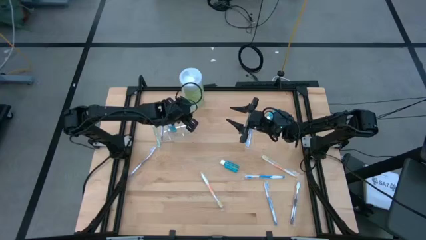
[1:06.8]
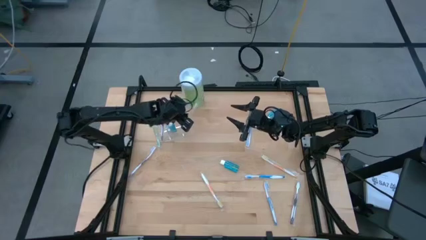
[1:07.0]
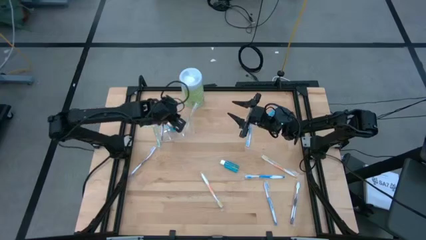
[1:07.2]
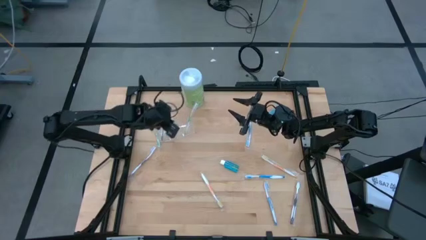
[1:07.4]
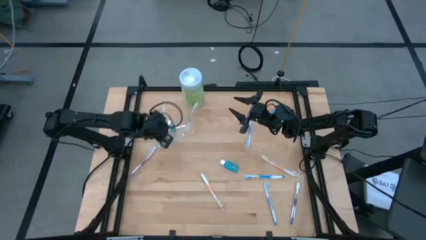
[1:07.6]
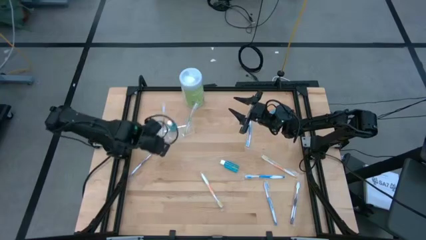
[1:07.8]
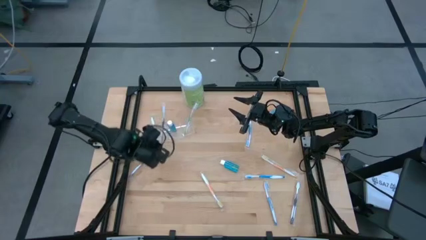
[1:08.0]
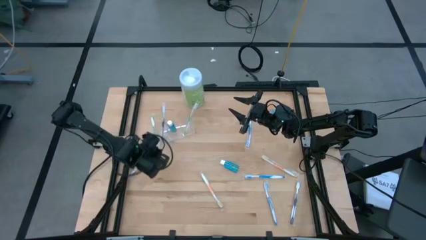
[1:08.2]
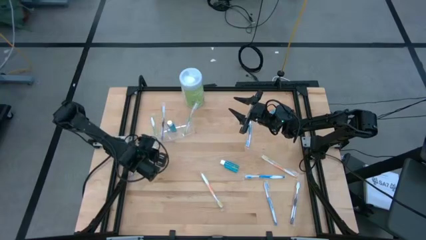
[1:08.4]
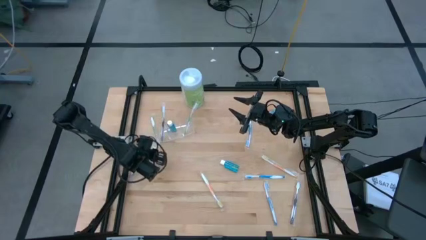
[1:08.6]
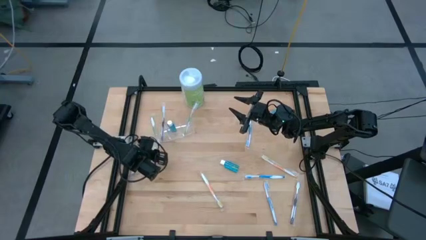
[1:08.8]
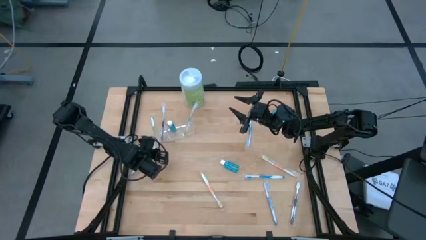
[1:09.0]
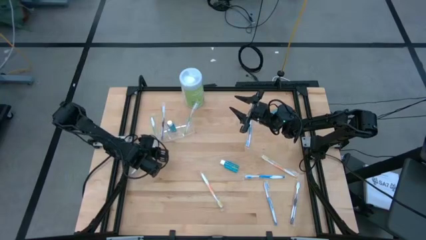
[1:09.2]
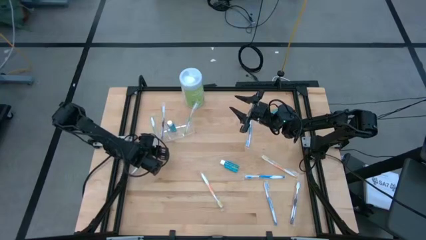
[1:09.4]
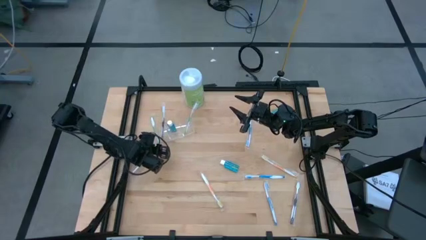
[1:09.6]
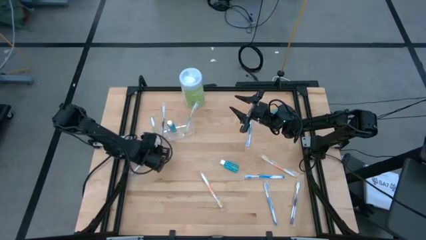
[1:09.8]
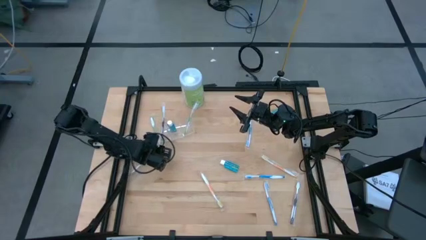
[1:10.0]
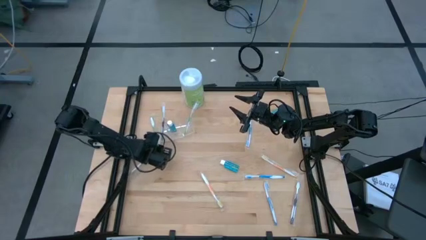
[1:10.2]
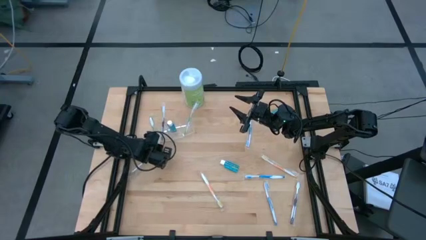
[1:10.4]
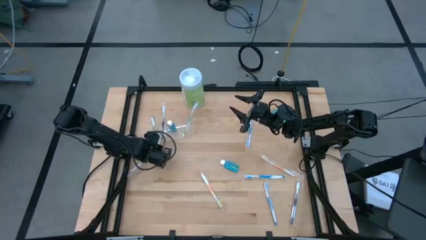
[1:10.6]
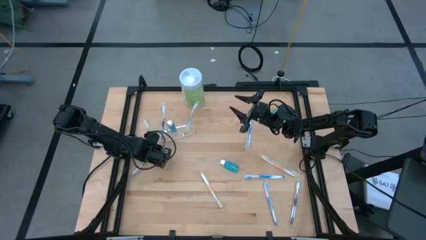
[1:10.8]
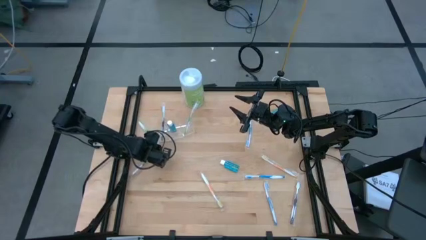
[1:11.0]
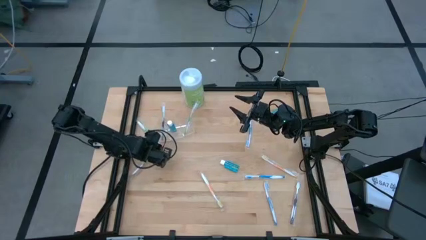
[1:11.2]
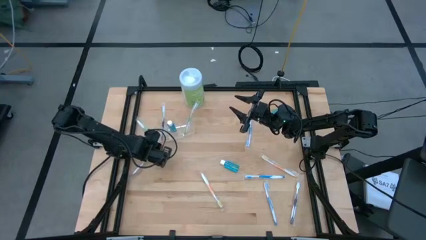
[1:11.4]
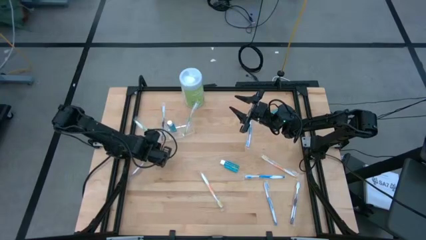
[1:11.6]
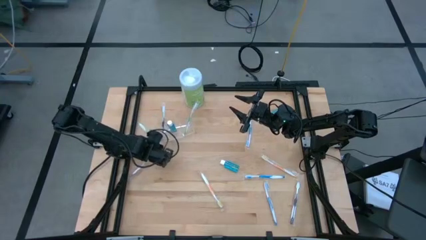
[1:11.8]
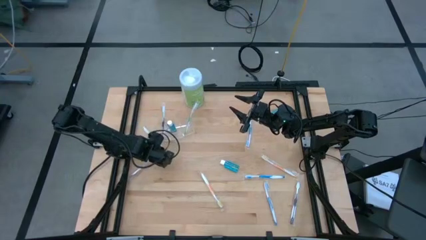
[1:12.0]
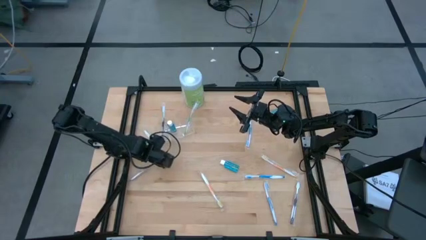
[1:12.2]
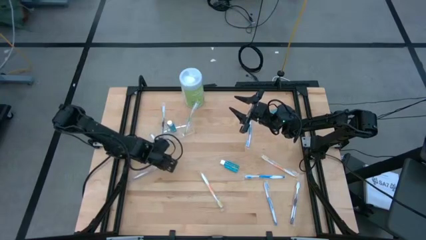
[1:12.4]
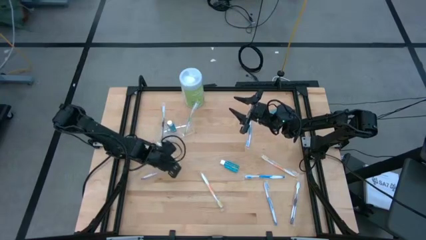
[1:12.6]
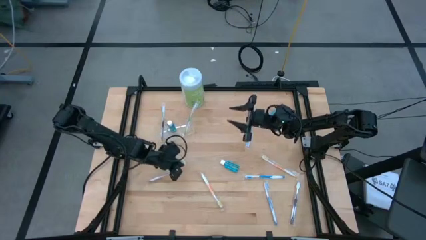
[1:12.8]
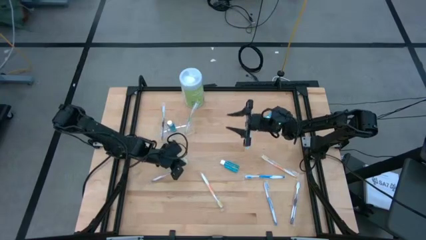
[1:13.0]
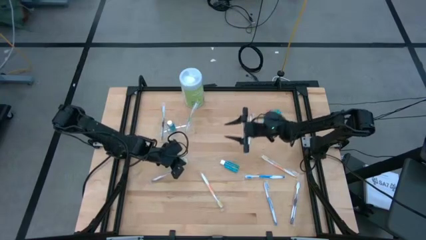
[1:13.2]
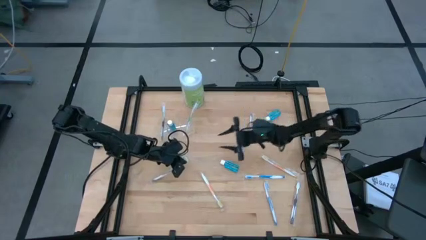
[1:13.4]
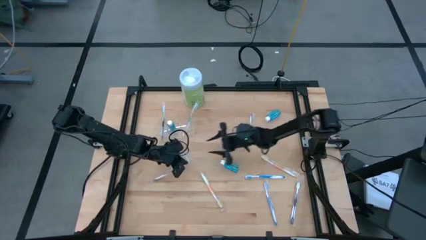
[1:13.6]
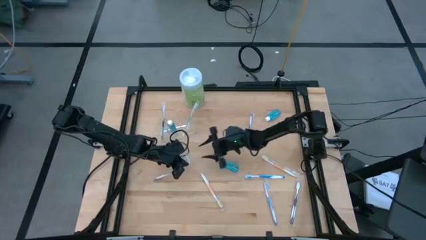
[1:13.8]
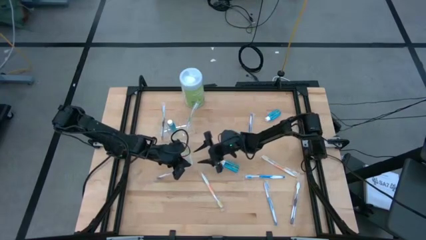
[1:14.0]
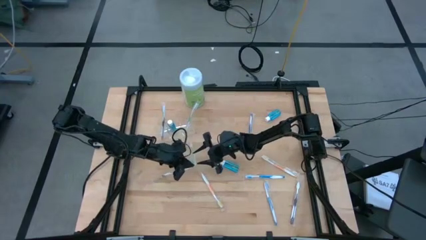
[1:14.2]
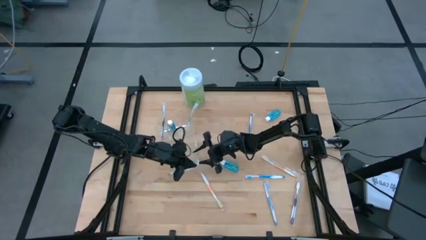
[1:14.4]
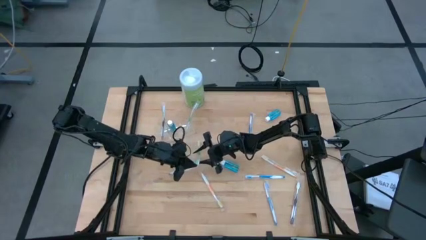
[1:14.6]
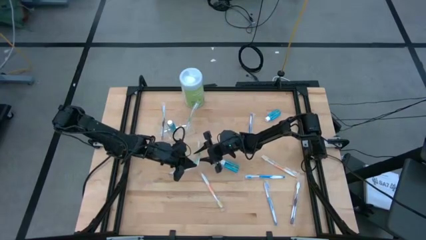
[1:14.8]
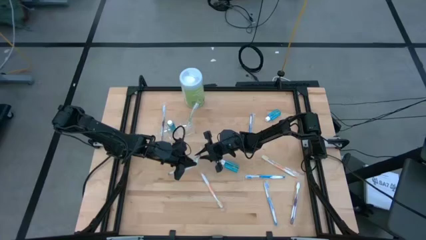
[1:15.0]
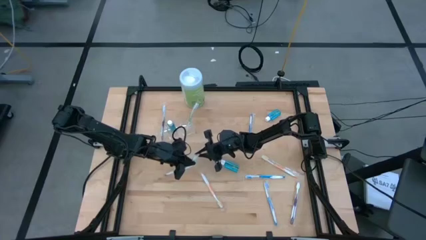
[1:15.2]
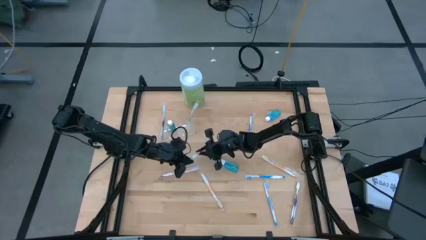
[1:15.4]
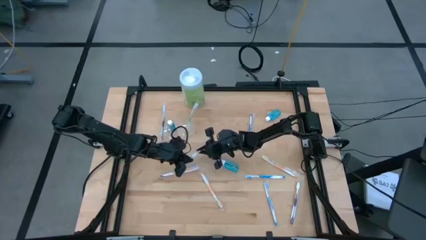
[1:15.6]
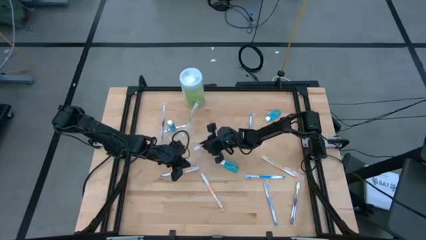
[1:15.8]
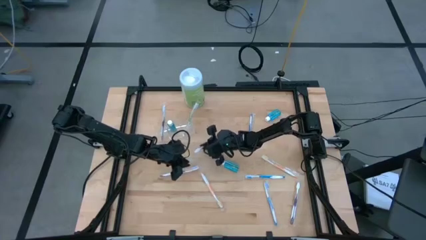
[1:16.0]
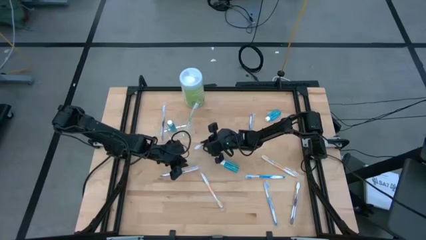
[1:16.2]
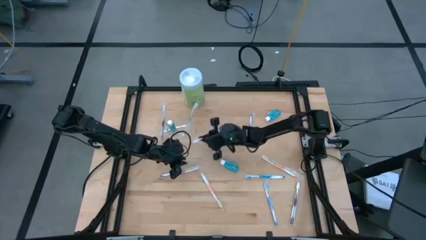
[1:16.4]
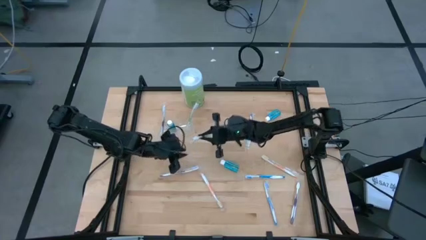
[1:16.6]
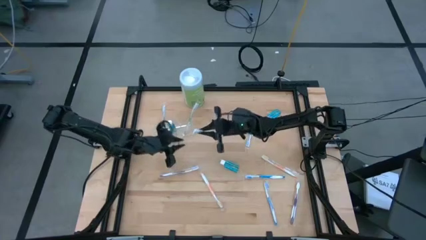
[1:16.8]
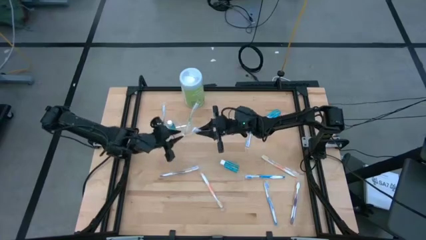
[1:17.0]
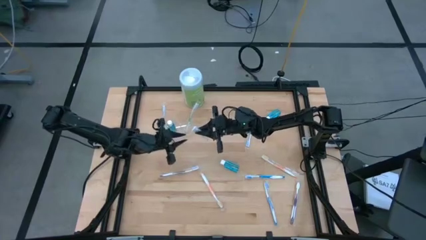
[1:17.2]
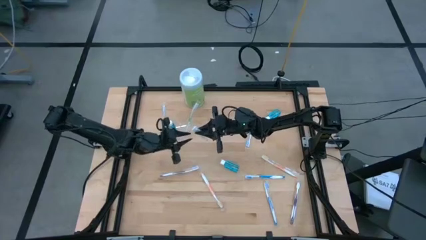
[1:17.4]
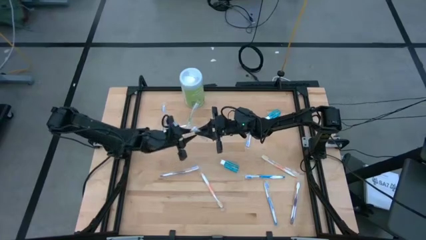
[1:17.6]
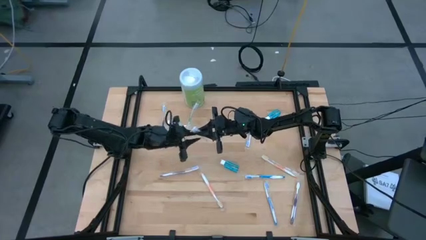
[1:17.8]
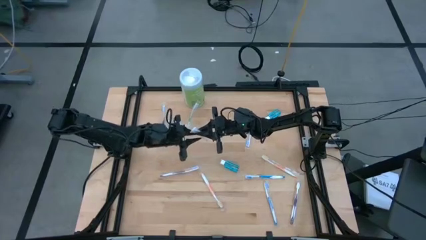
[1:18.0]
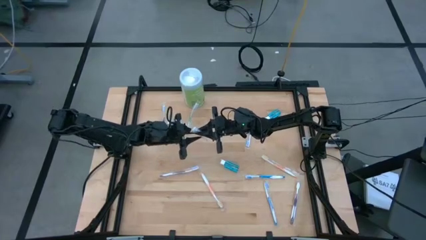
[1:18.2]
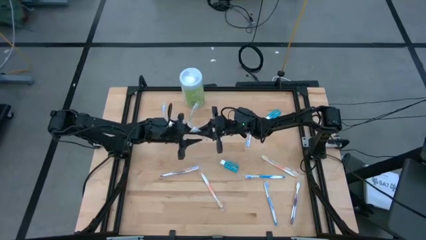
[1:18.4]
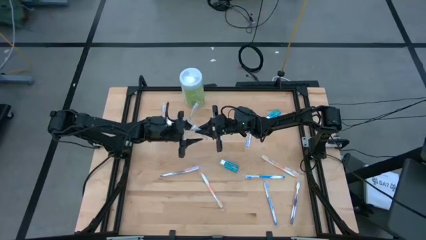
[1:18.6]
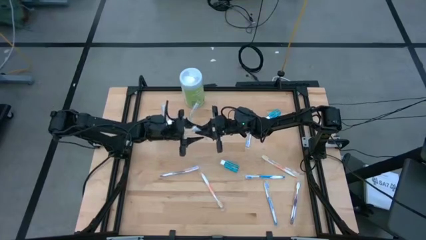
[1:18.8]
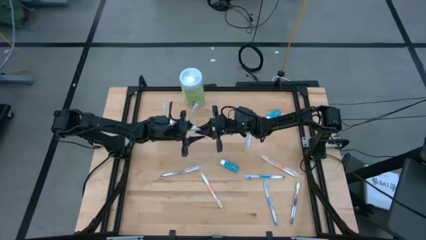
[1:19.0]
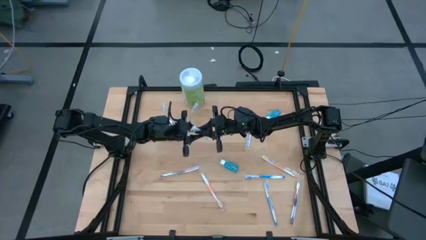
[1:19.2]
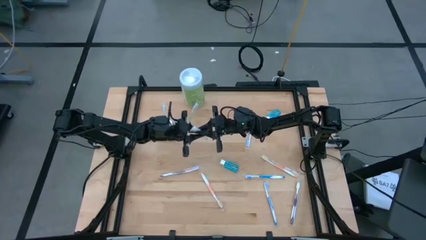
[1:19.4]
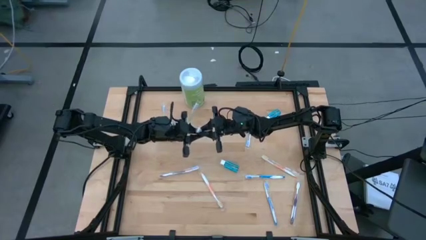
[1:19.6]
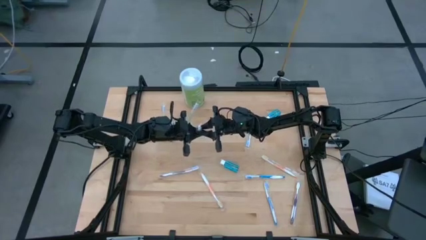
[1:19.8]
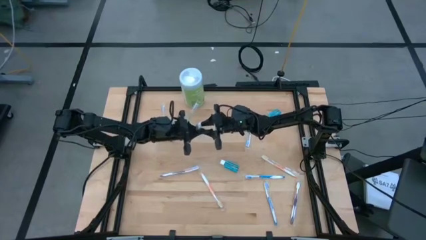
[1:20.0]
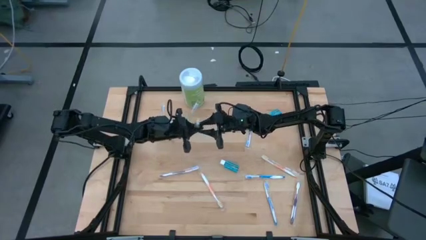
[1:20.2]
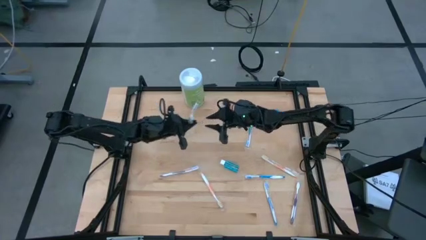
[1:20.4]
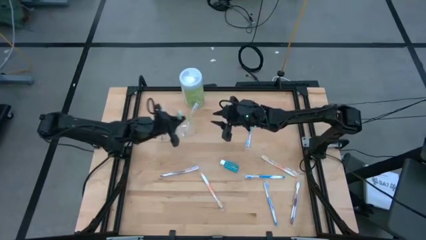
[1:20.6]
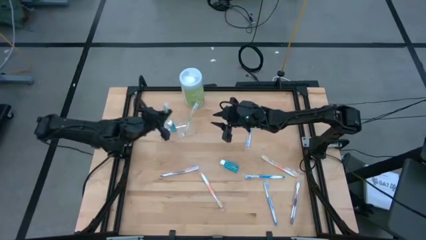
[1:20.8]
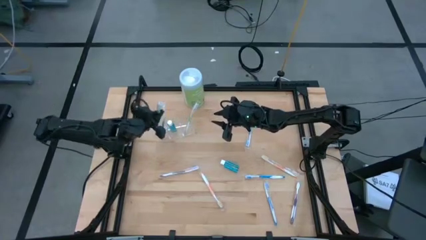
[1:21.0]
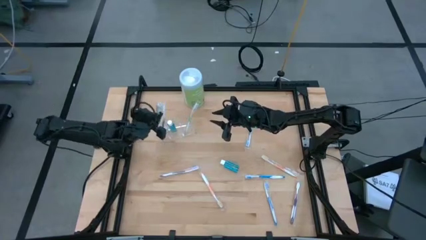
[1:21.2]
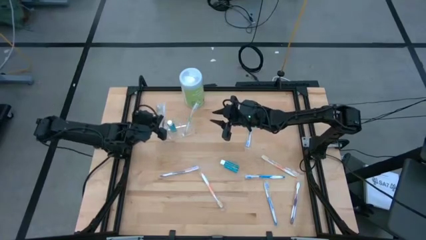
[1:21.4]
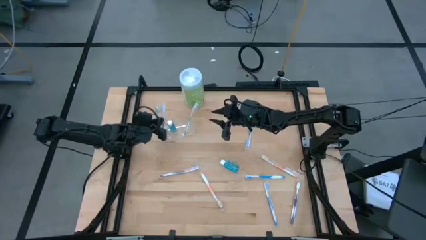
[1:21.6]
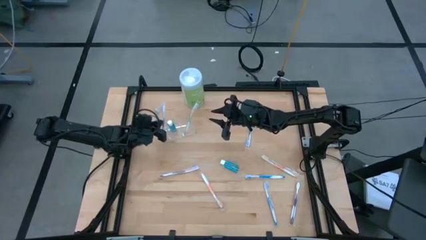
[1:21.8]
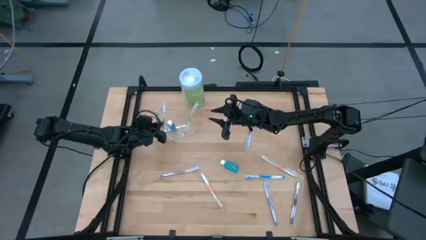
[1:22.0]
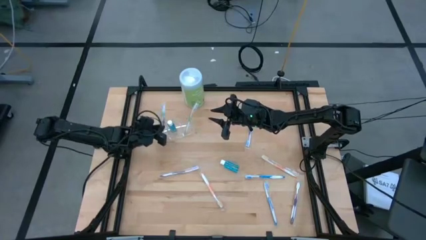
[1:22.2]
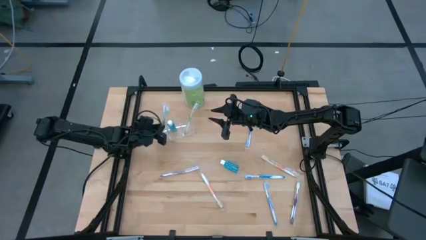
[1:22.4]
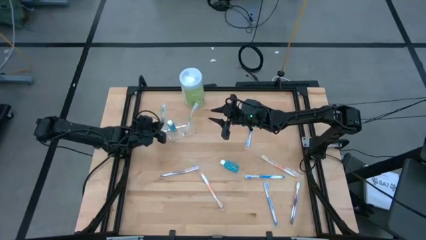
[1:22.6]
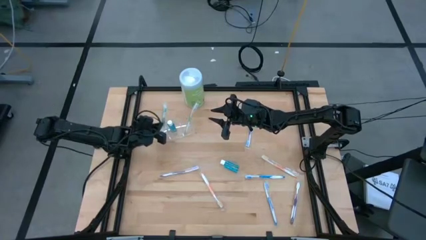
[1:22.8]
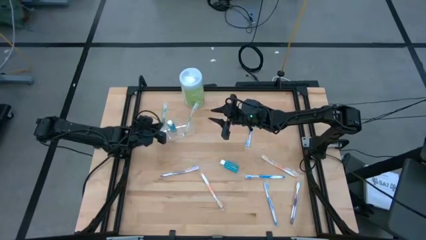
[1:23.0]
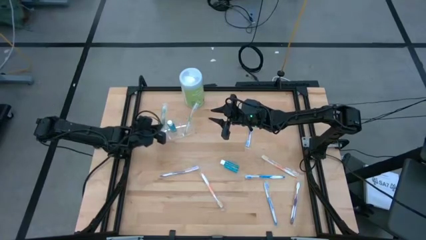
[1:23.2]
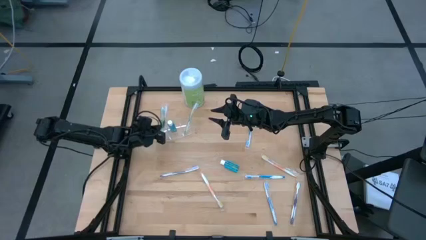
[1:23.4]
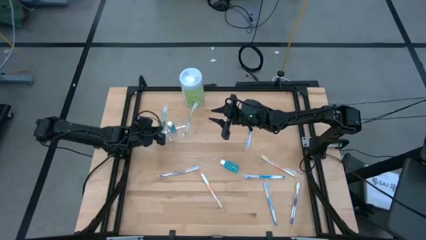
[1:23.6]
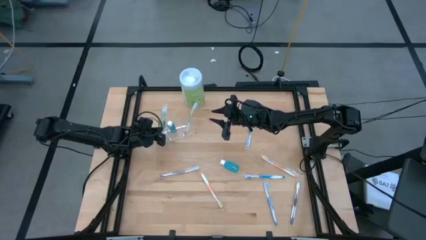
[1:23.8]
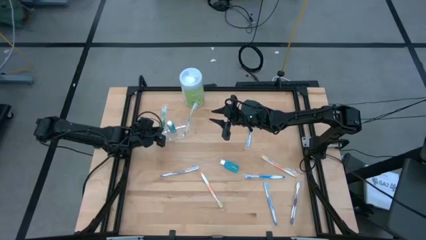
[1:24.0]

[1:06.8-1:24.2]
Task: Pick & Place toothbrushing station
Put the green toothbrush into the transparent organizer
